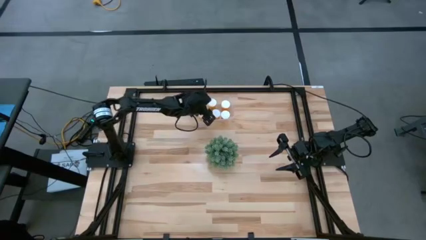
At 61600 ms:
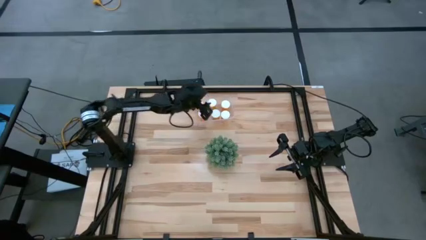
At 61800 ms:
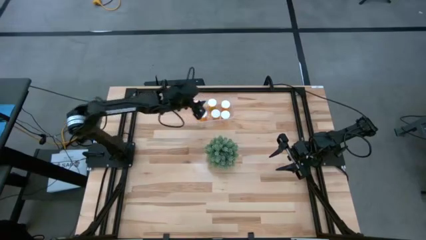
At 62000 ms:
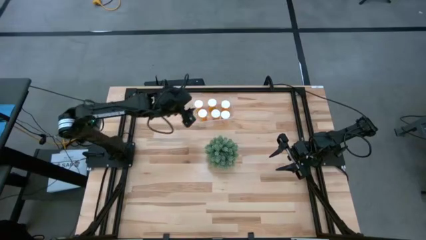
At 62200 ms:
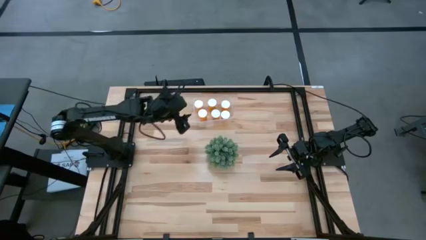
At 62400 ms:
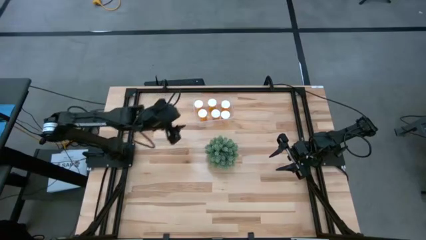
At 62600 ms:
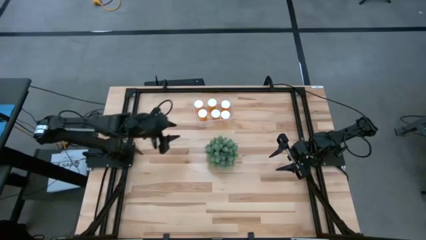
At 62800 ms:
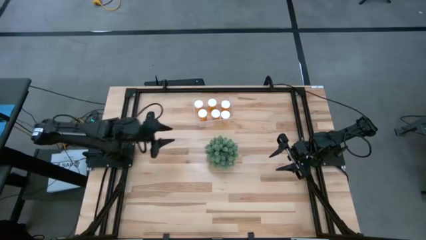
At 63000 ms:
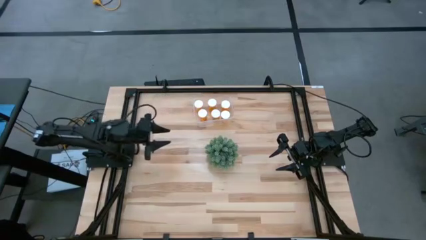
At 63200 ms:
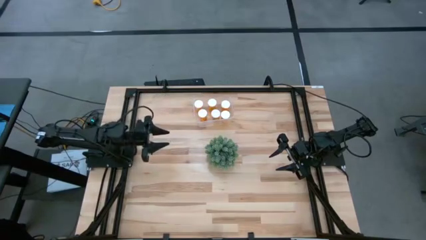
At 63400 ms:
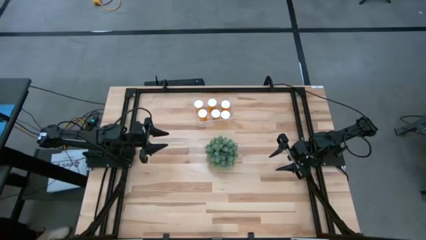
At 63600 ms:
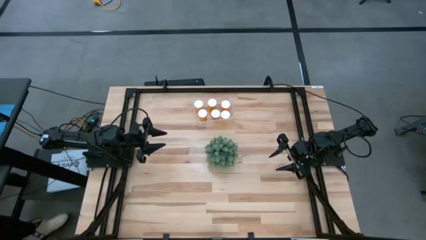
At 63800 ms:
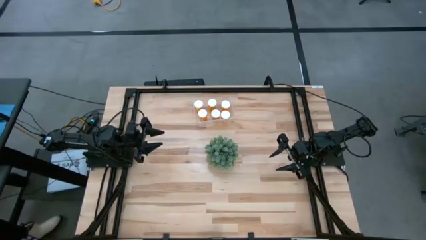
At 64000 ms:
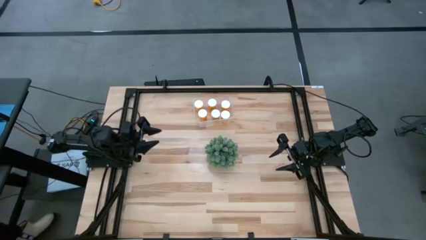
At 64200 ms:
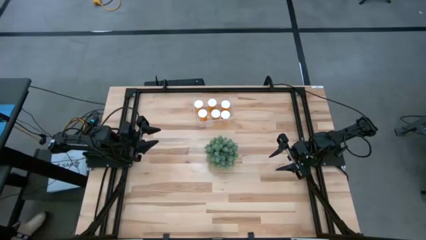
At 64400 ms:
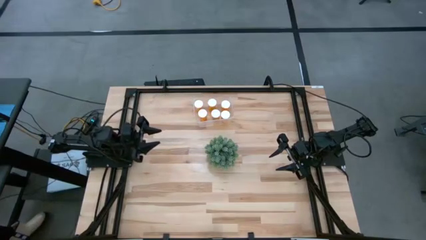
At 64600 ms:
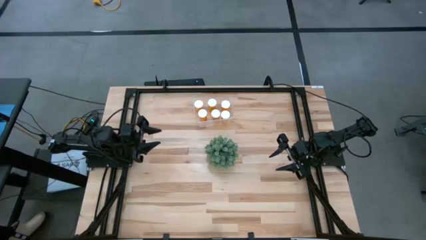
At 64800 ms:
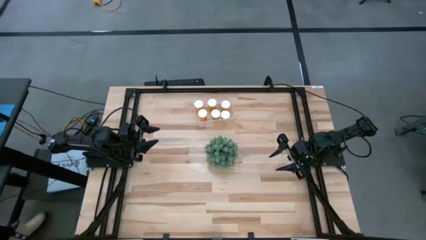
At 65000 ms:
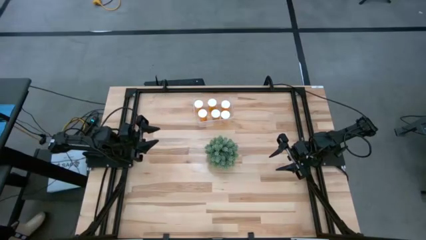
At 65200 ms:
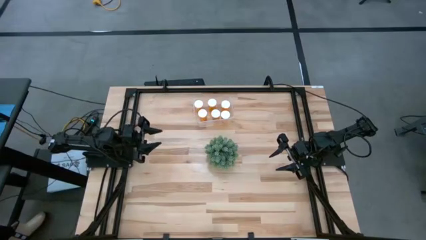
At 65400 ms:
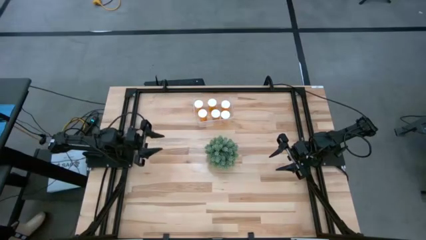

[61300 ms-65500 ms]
Task: Pick and place pill bottles into a basket
Return to Home Position

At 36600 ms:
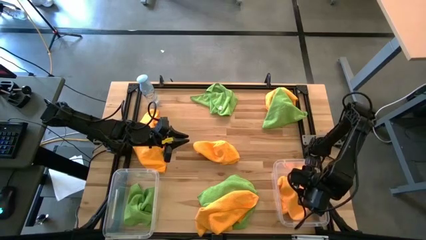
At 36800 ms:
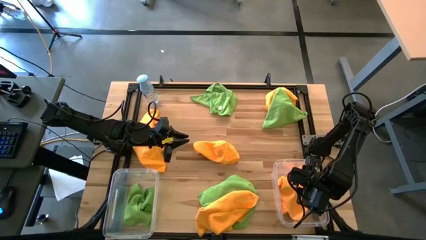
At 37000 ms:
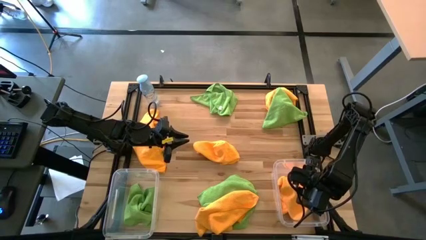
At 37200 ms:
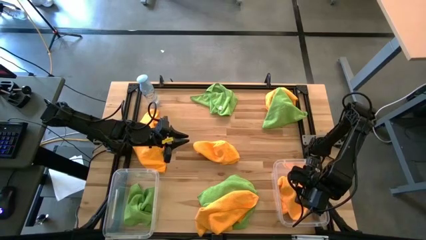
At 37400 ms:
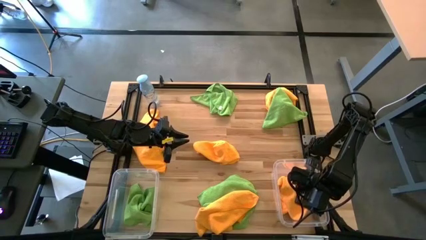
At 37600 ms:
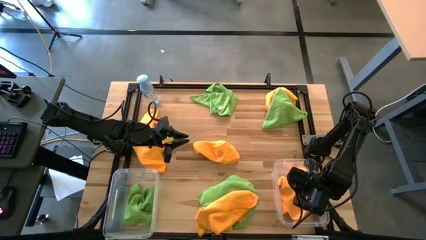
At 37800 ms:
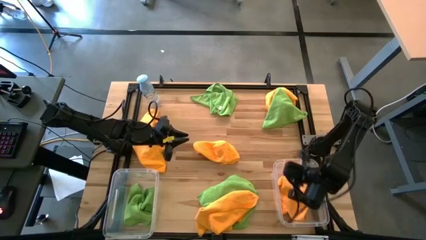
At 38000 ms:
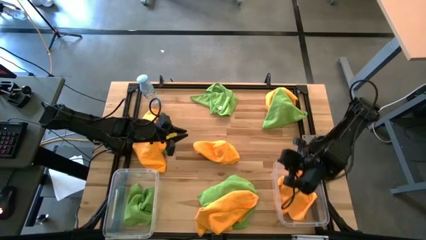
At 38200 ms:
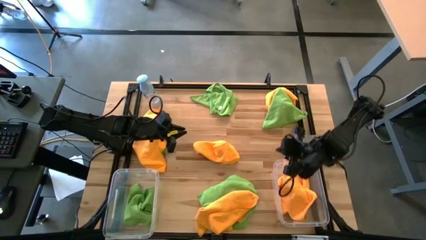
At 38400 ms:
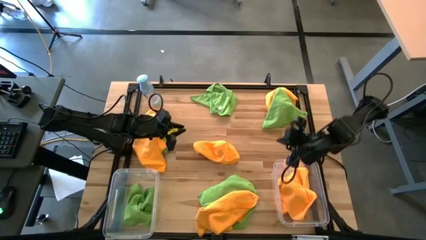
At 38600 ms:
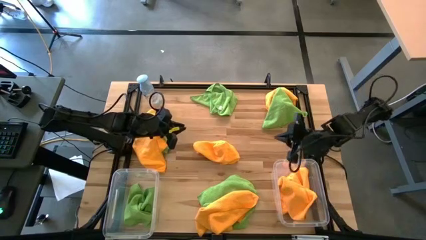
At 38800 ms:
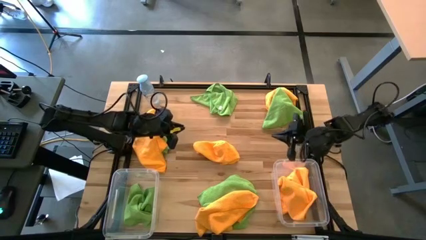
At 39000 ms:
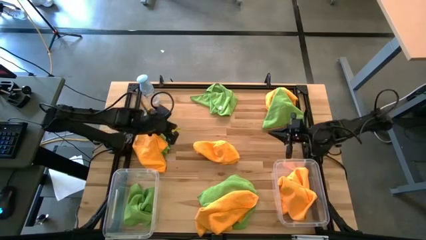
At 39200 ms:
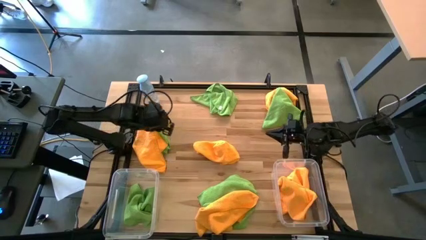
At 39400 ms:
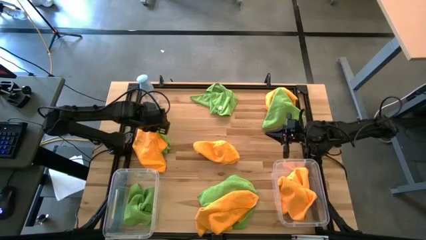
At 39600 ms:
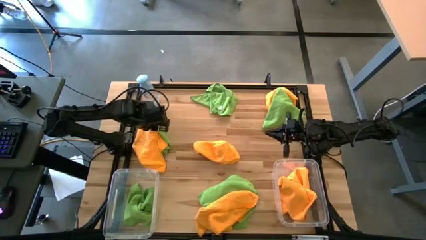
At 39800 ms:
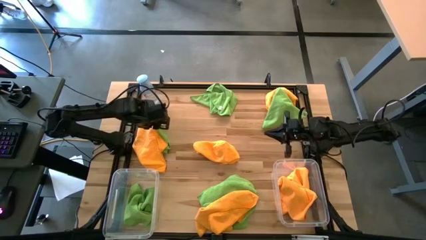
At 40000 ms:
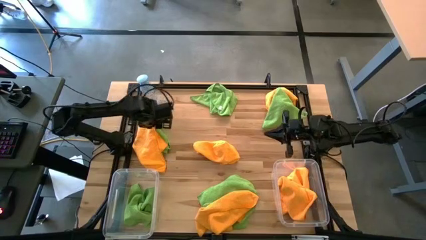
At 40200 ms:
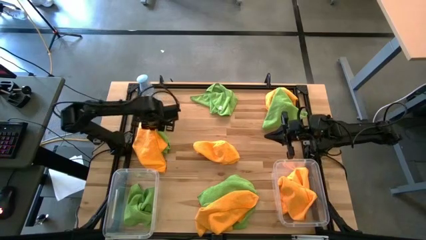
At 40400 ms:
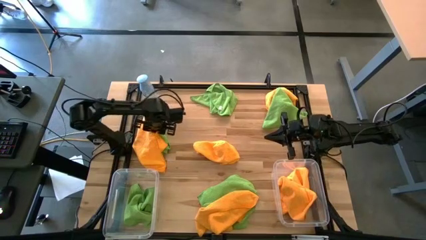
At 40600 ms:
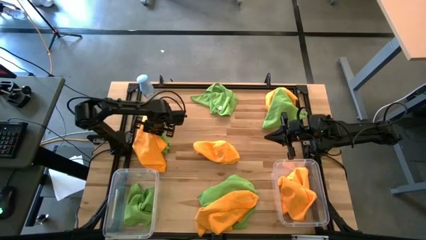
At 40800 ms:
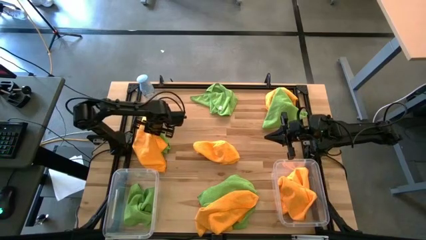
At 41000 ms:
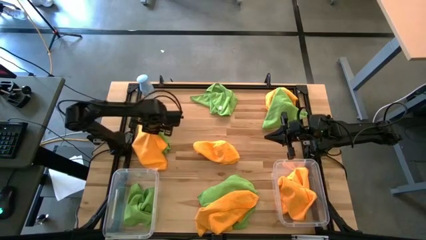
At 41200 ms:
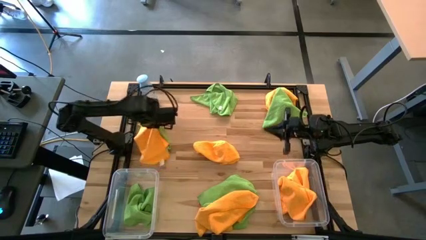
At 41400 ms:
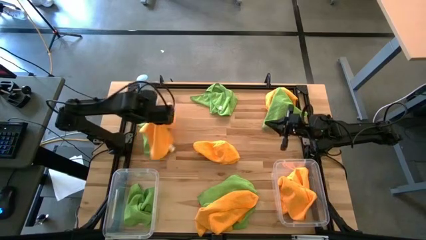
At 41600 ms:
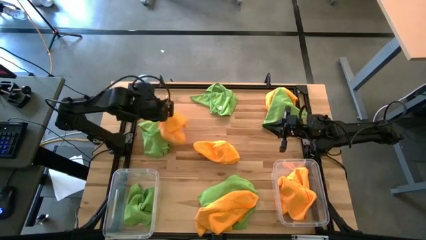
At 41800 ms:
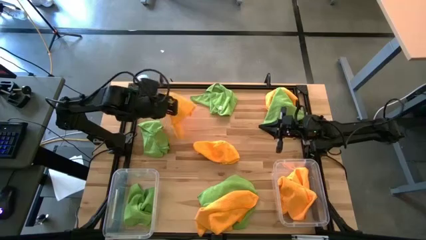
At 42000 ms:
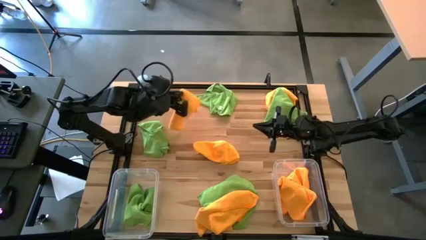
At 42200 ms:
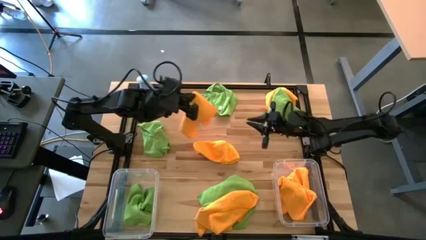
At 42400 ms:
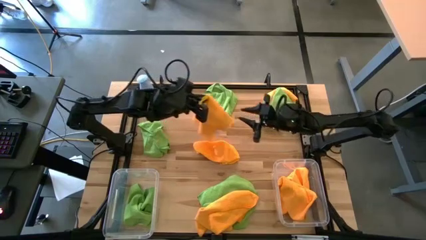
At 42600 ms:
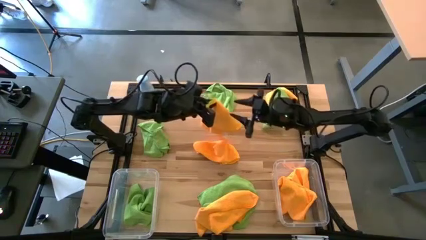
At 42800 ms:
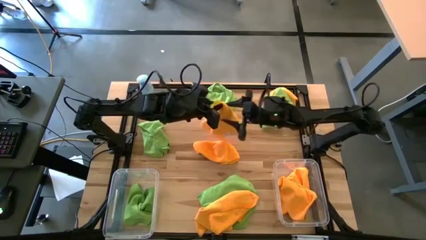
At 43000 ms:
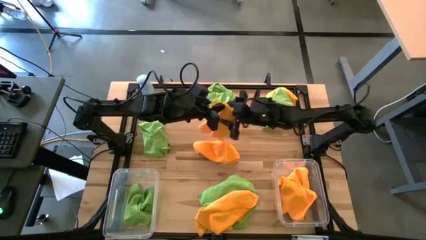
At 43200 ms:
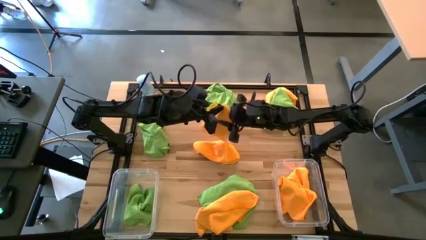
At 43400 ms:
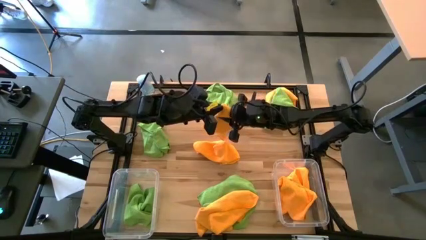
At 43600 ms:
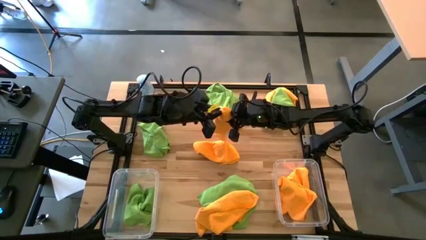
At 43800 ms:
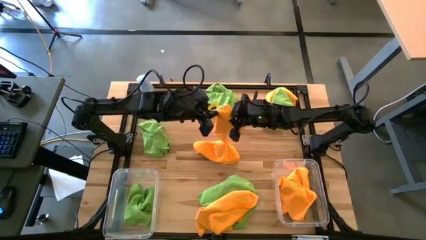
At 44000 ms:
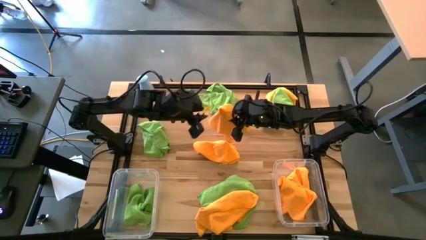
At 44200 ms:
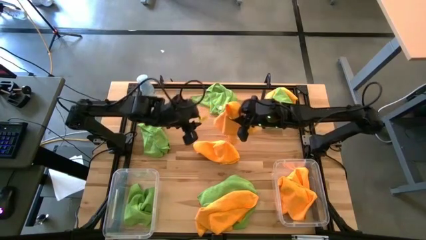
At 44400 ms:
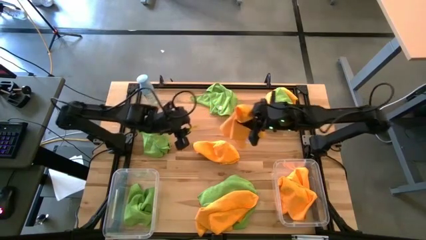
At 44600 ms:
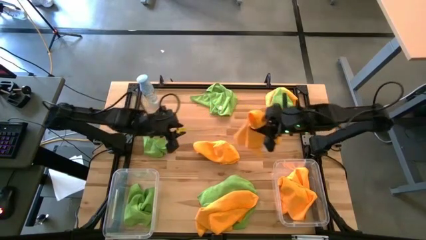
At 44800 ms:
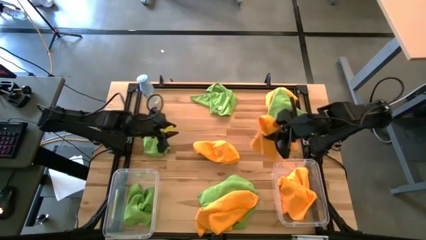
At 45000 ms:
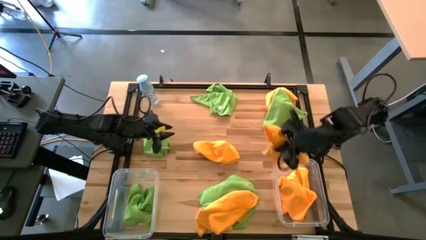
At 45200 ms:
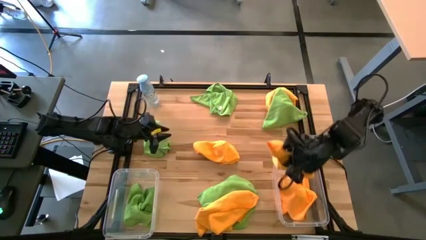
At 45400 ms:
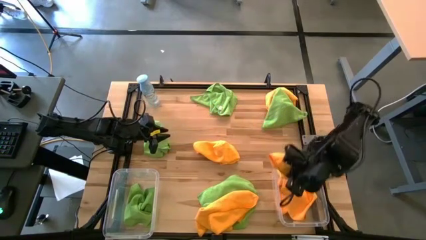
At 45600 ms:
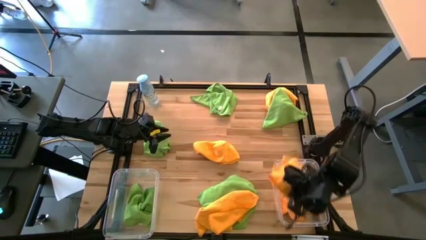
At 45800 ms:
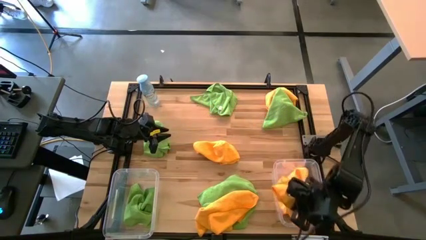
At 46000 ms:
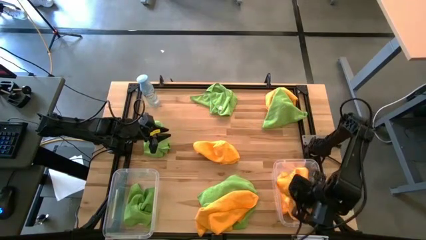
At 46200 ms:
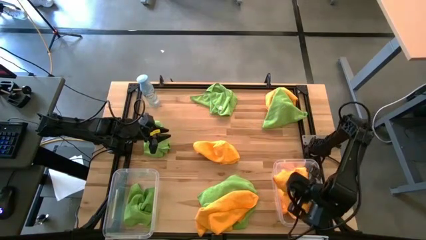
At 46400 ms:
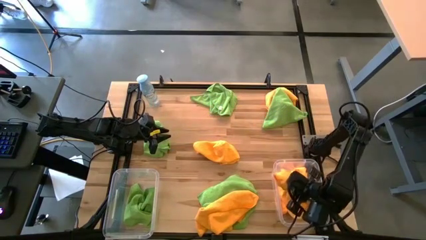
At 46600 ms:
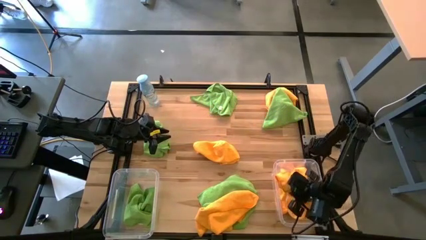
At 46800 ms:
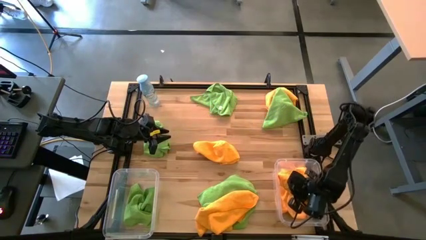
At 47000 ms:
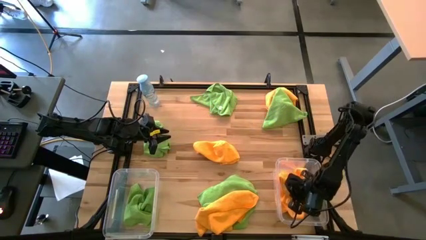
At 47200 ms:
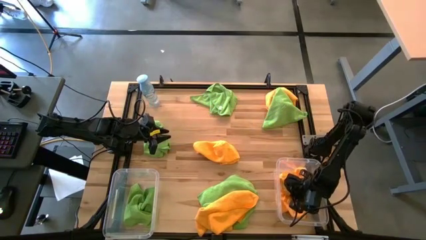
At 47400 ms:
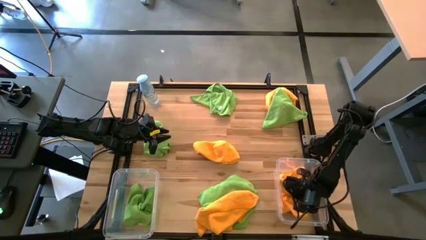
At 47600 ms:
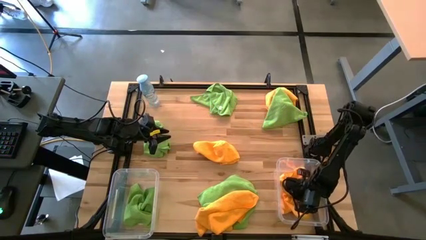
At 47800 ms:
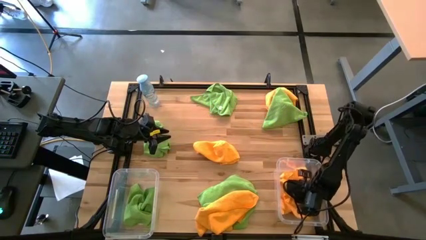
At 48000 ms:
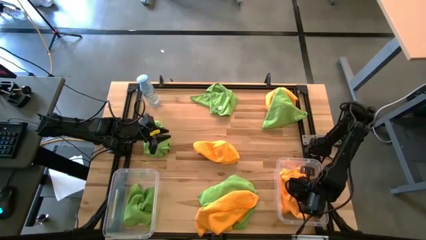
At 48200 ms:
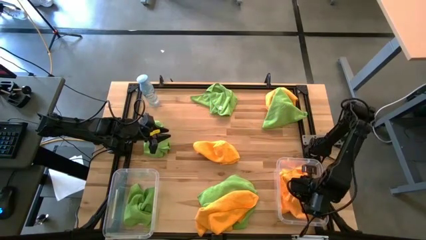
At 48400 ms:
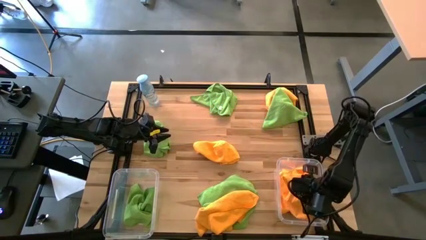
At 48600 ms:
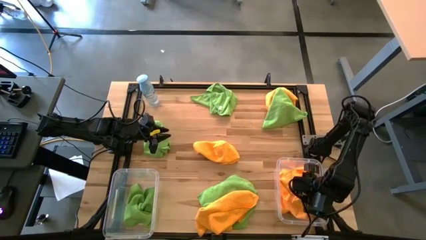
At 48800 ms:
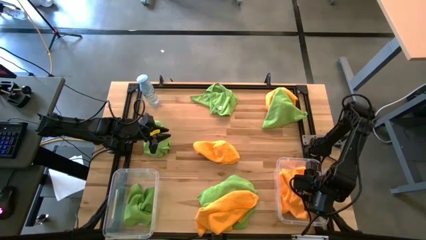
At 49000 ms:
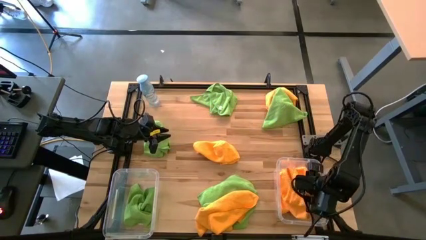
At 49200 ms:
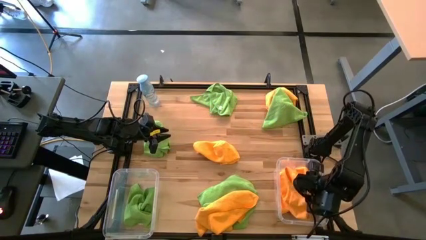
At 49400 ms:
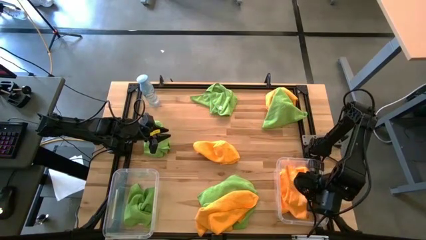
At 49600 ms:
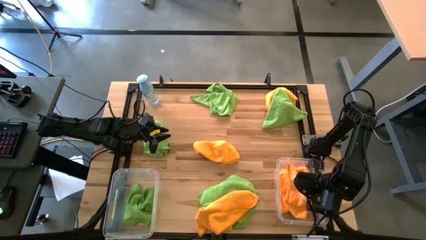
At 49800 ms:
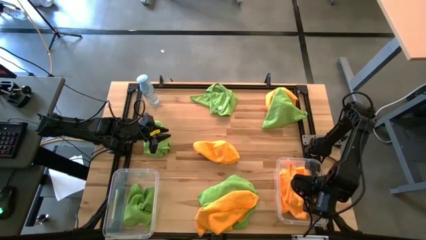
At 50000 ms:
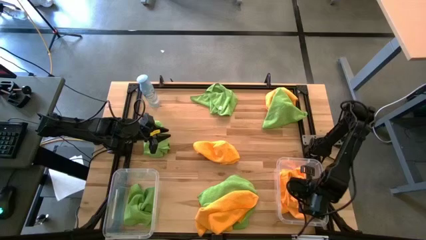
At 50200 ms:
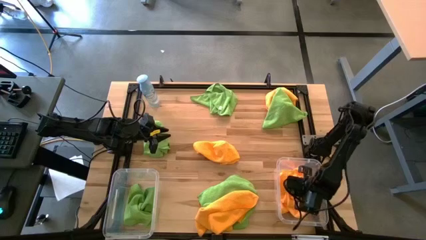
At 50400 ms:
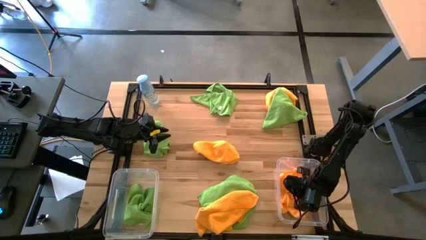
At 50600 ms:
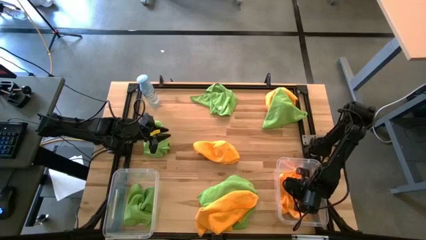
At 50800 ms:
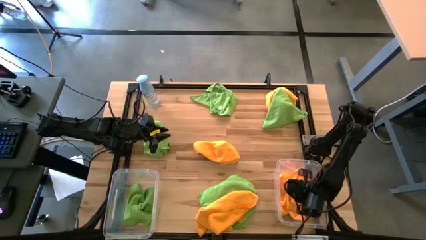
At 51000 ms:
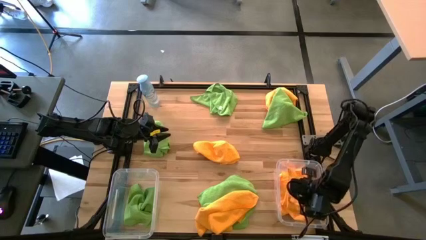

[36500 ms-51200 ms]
Task: Sort microfiber towel by color & place in baskets
Put the yellow towel into the right transparent bin
